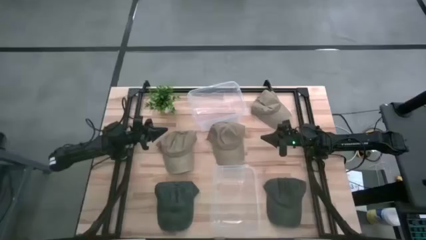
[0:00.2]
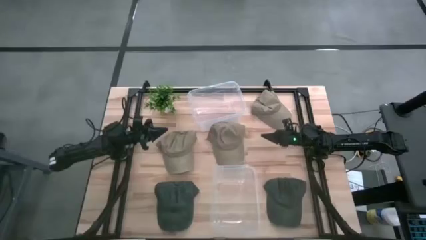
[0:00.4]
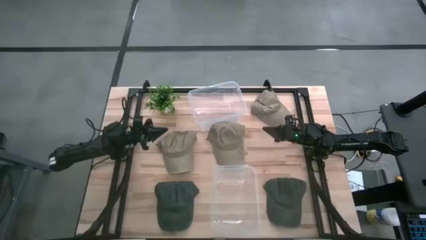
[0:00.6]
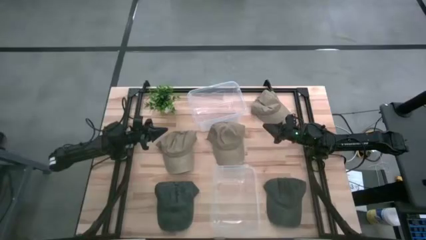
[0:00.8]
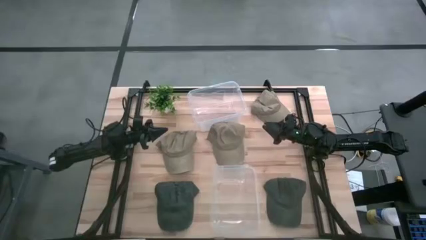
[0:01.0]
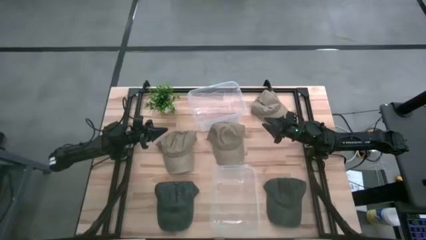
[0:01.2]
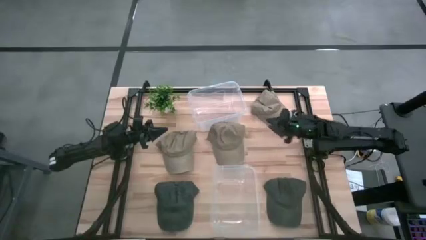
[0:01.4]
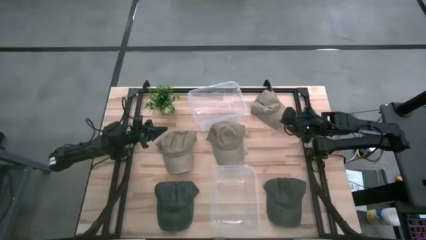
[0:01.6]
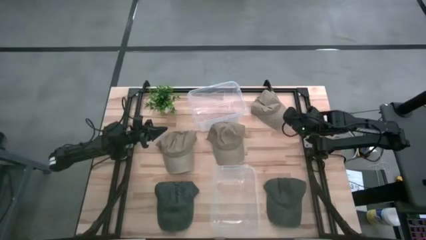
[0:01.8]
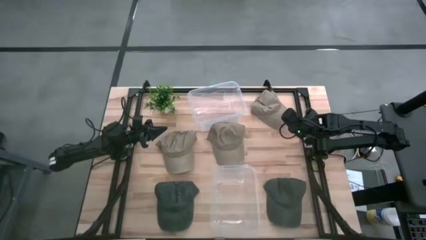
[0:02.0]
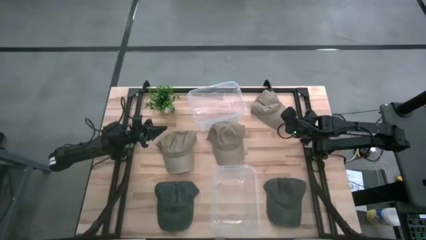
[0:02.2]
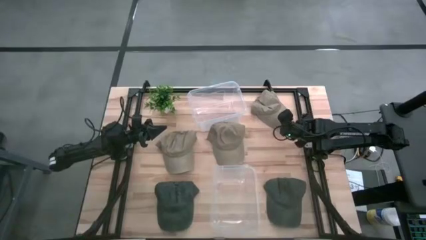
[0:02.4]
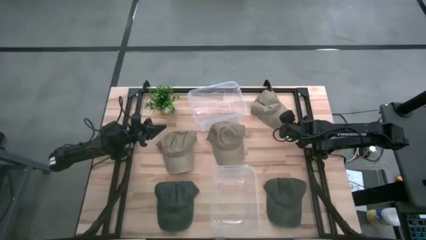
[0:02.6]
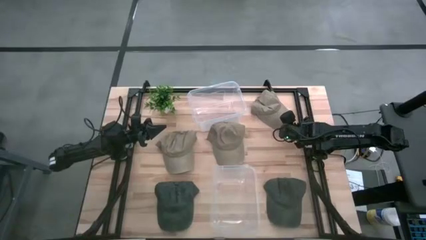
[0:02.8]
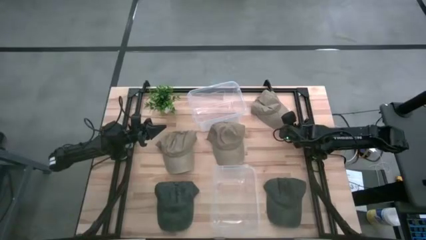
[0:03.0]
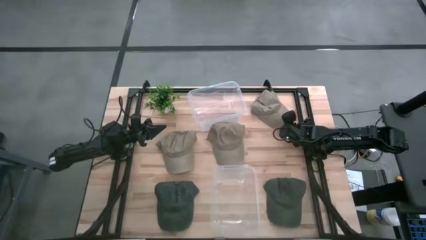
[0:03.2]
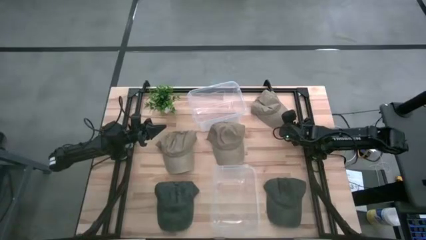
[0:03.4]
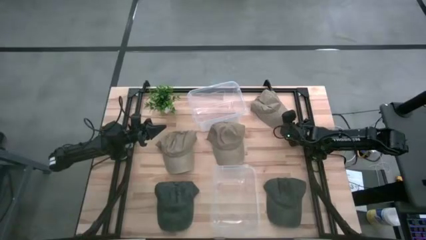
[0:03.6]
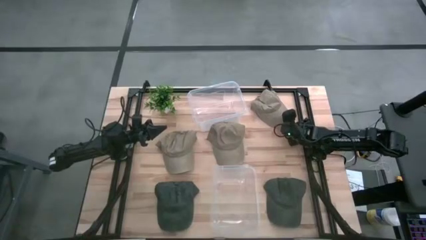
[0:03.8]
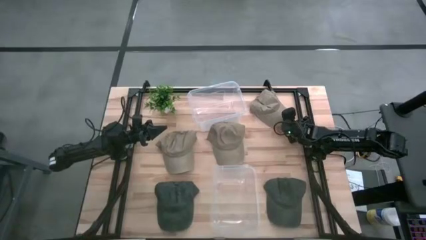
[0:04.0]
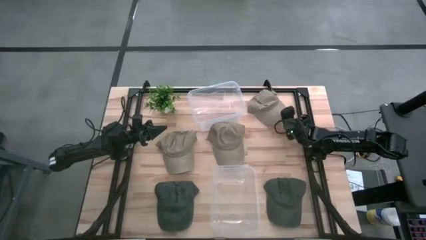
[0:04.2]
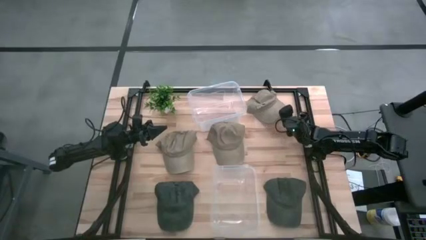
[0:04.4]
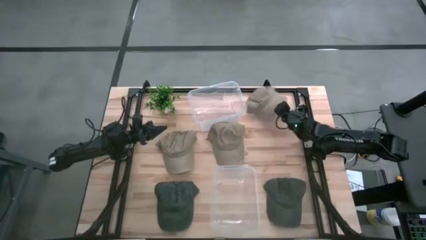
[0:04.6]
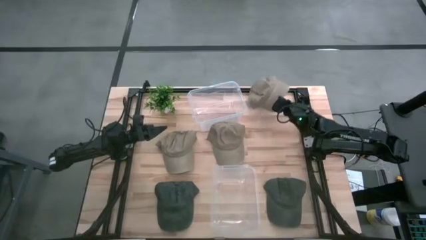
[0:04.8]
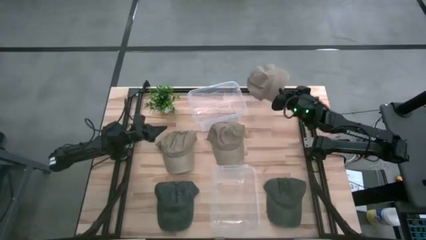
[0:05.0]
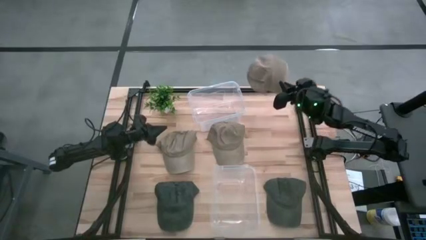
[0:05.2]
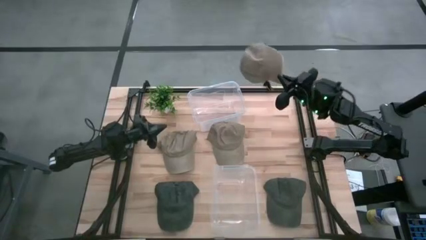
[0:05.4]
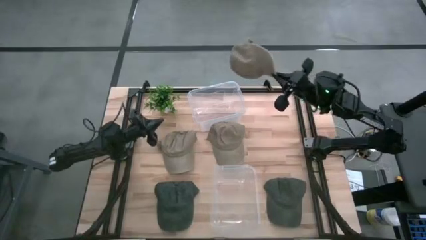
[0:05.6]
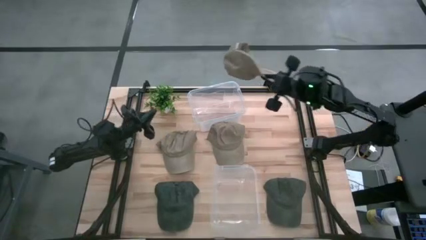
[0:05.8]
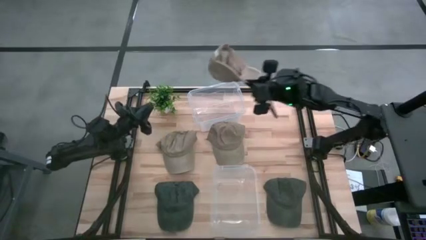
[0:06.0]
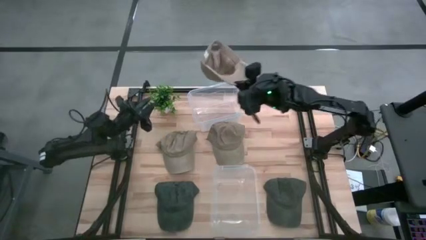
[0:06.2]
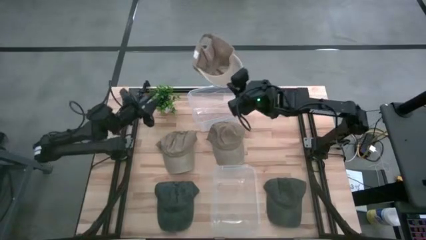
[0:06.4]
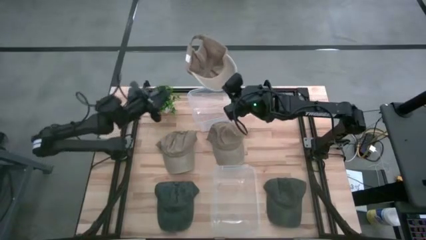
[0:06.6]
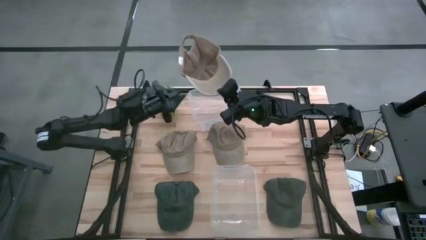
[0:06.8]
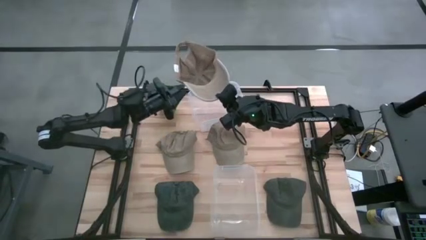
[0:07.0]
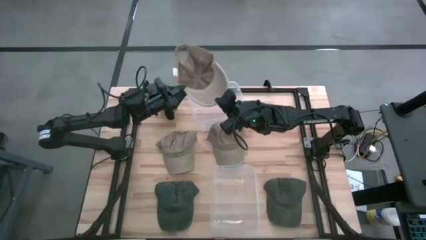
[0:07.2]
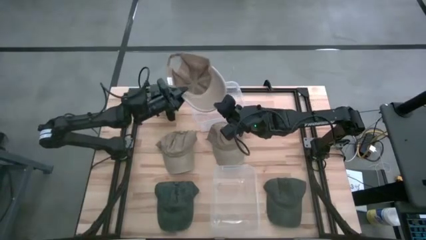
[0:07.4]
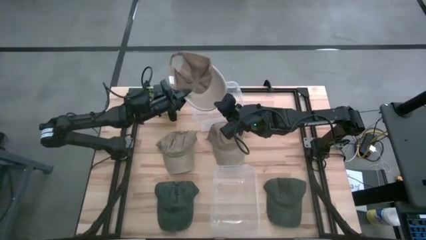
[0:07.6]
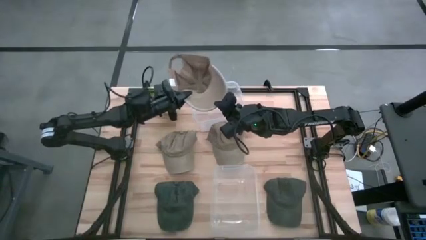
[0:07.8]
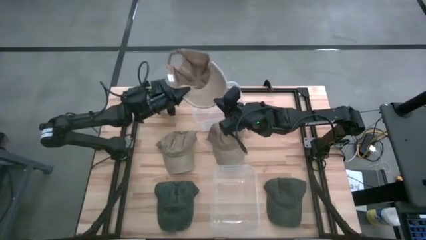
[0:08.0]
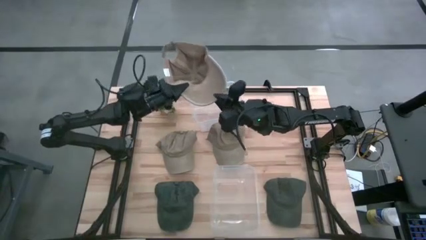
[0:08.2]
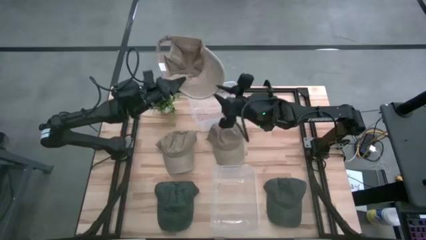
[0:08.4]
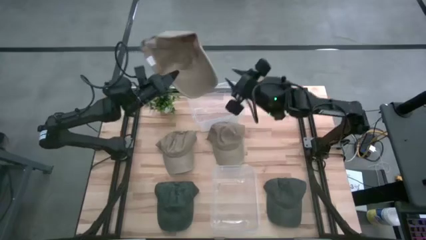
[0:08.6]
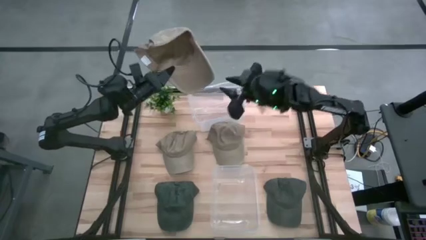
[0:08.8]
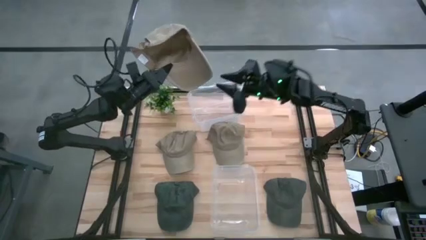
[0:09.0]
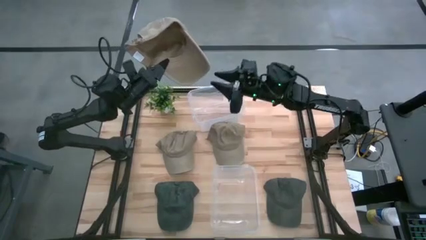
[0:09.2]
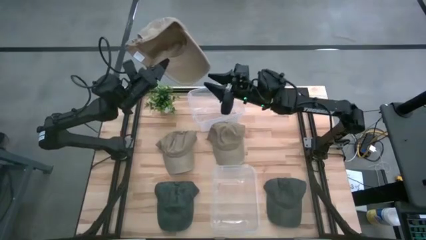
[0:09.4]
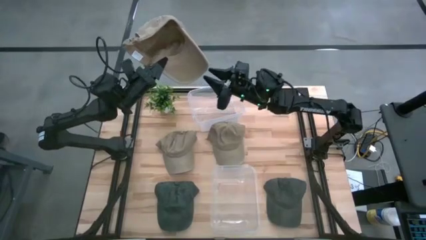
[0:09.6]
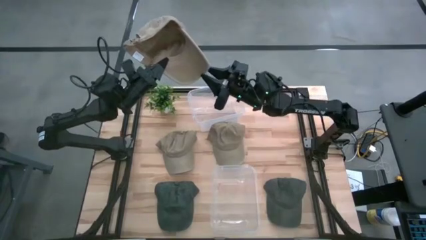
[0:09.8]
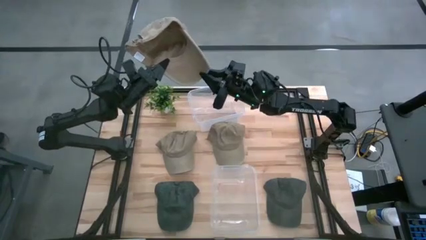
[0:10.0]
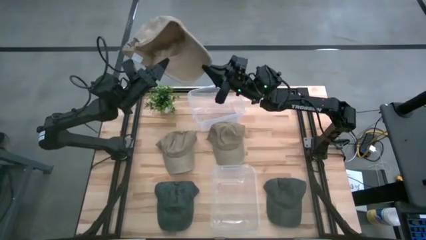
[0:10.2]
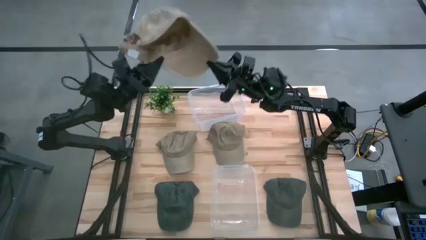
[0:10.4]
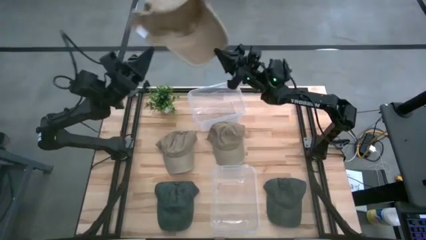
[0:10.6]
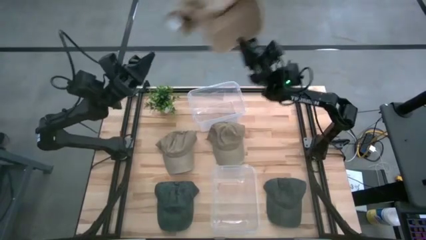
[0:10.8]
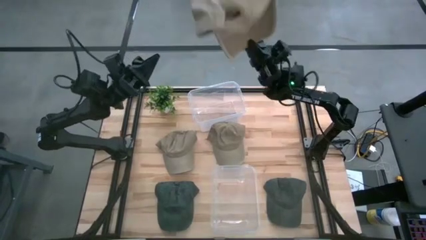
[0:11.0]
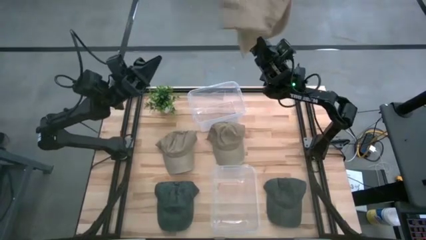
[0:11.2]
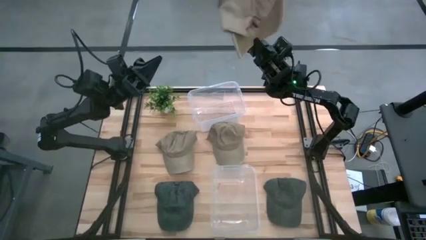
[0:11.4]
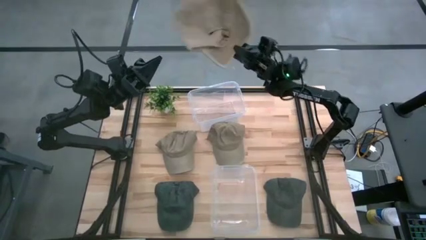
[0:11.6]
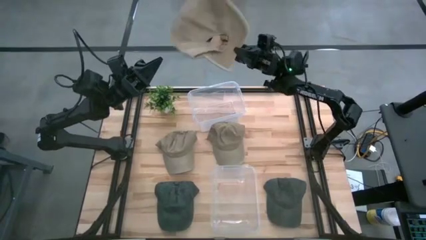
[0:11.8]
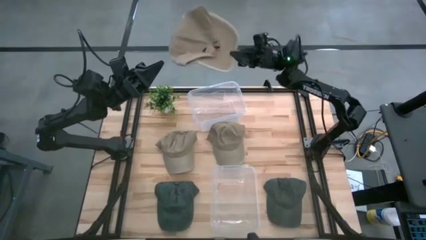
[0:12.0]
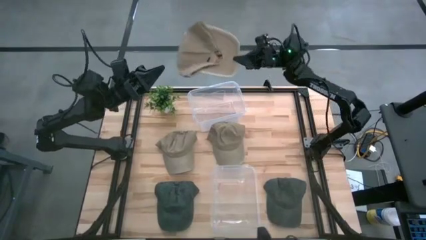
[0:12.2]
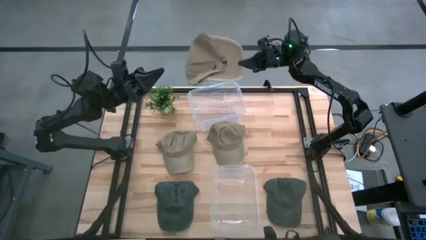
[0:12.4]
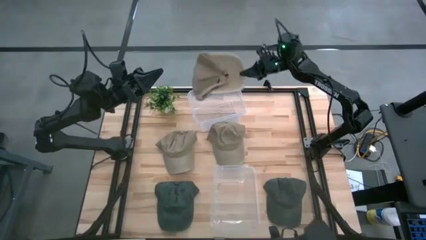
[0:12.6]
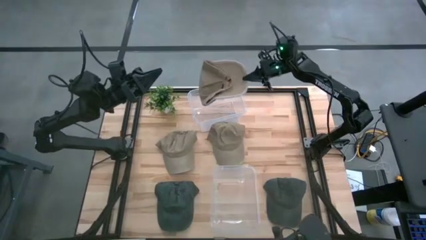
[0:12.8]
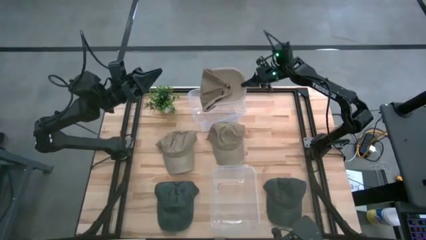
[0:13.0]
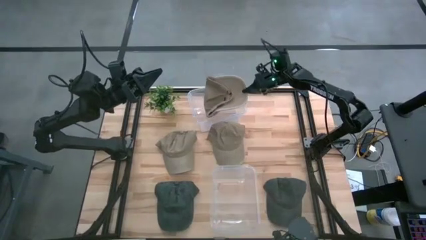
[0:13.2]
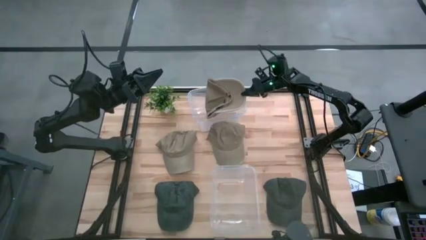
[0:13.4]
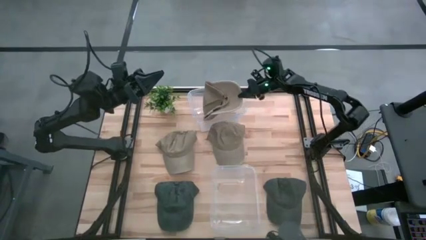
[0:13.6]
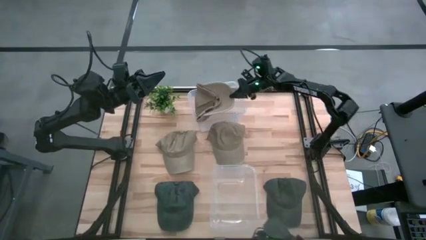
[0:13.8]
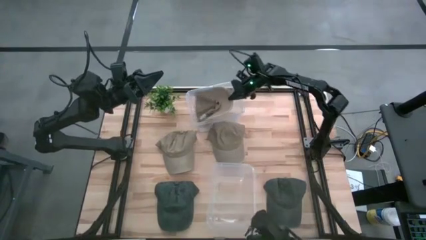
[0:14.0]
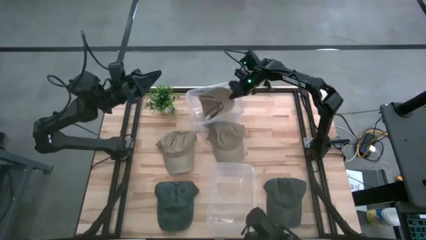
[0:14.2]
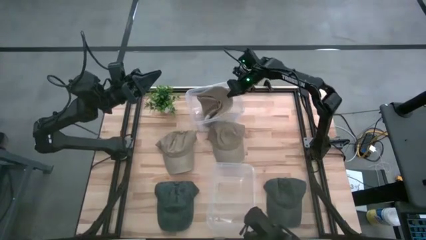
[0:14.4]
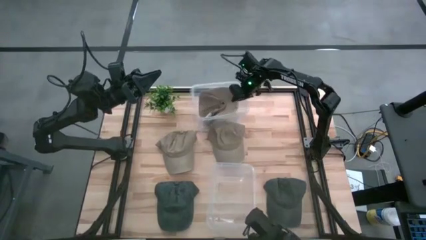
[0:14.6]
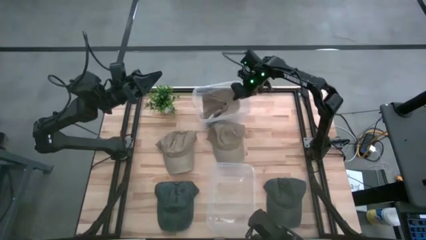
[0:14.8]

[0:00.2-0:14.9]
Task: Pick & Place hat
Put the right brown cap into the top transparent container

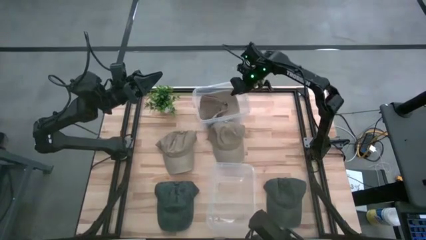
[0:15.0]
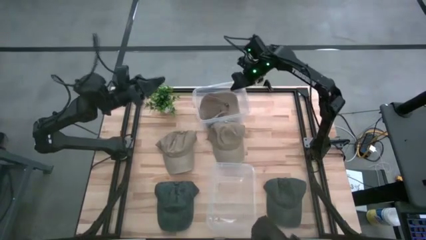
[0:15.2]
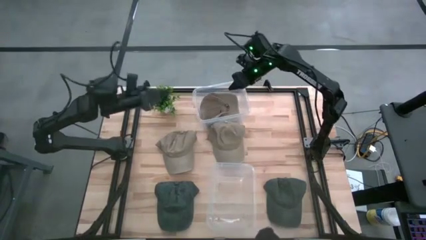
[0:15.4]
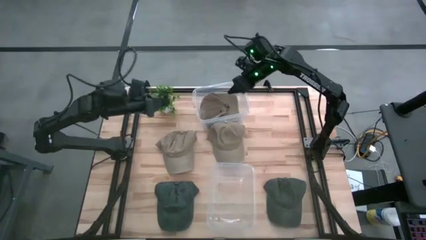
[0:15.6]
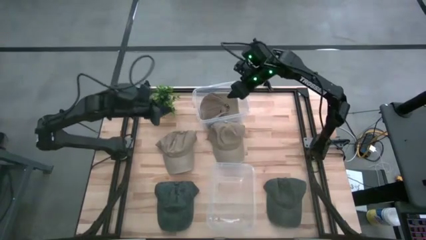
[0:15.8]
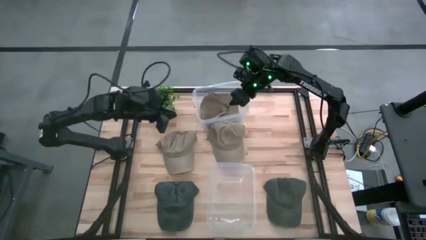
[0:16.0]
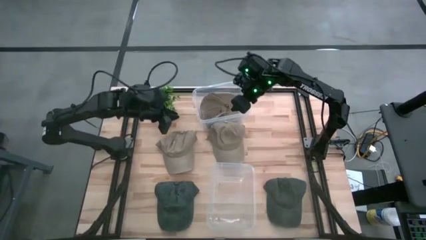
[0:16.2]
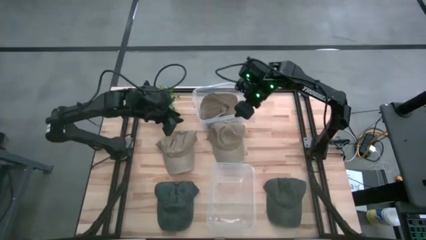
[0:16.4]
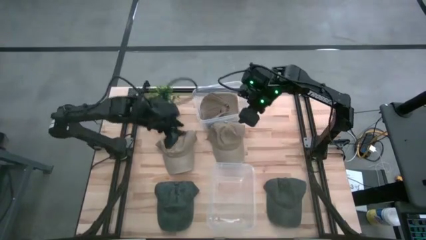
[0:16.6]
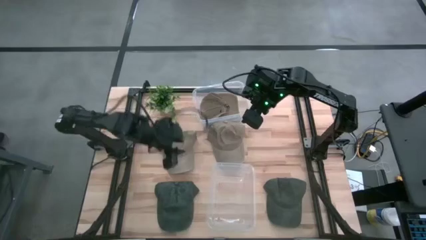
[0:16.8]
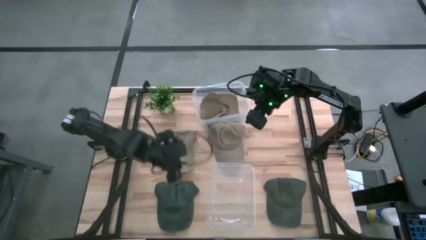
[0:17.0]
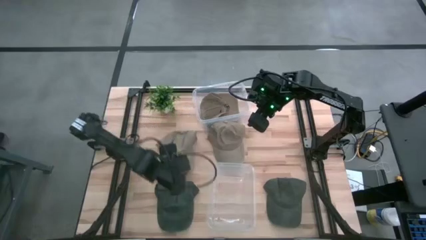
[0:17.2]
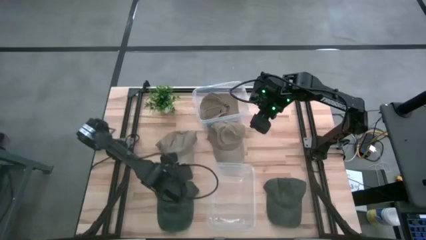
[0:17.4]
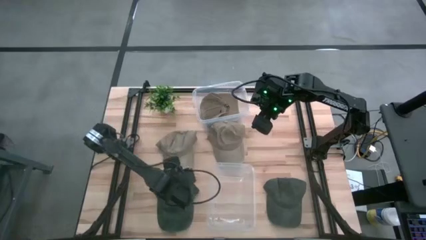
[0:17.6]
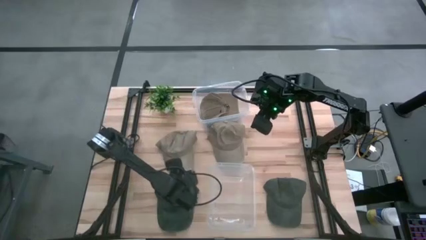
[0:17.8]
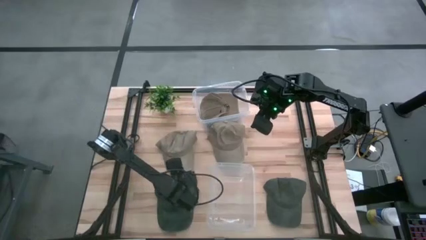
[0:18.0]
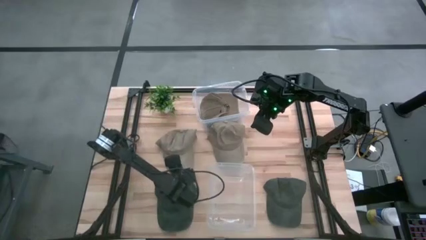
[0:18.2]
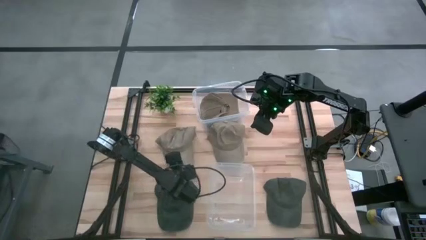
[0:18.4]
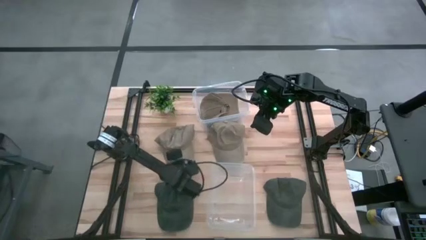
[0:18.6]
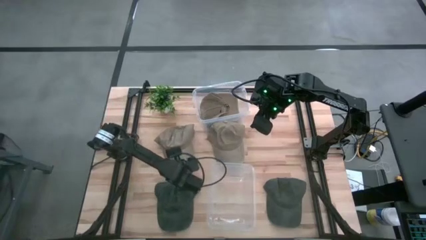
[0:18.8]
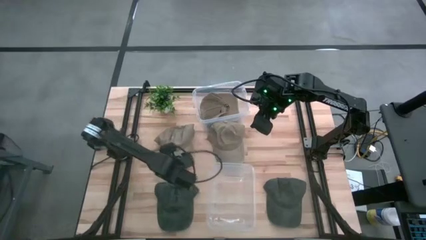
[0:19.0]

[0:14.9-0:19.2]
Put the left brown cap into the top transparent container
